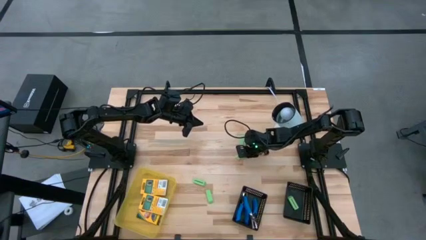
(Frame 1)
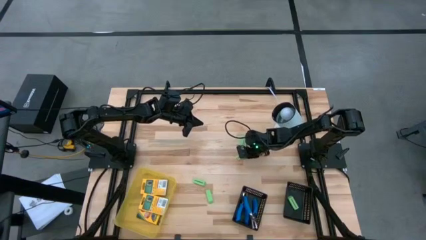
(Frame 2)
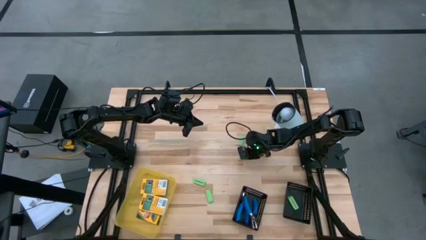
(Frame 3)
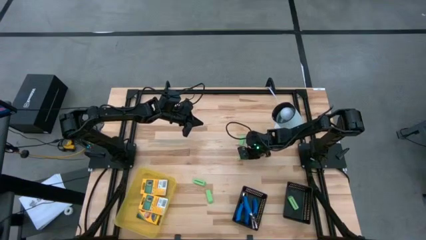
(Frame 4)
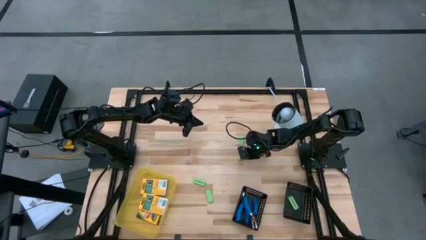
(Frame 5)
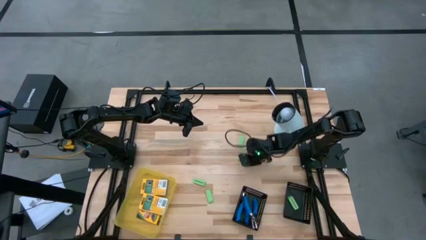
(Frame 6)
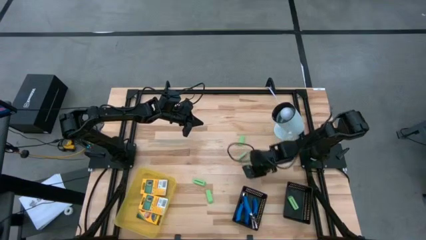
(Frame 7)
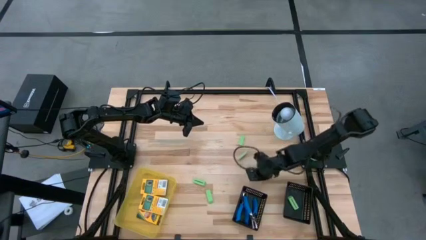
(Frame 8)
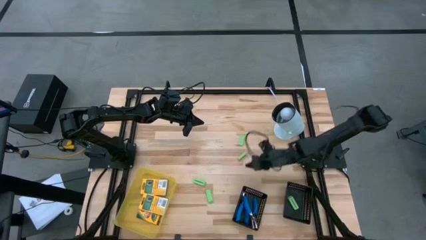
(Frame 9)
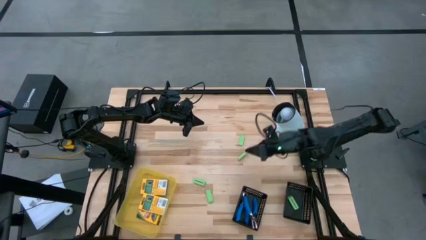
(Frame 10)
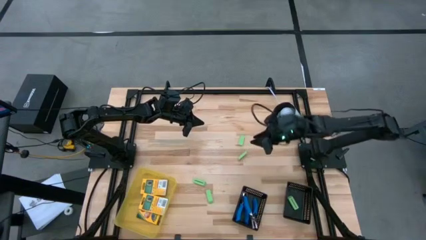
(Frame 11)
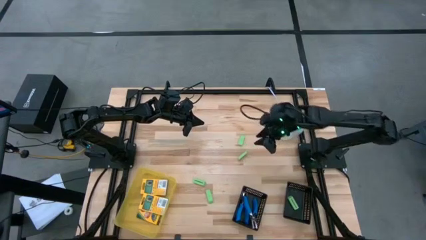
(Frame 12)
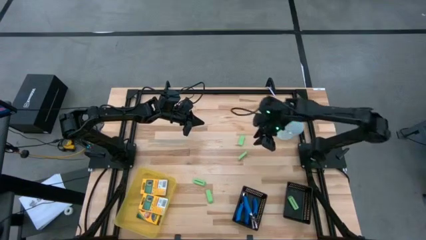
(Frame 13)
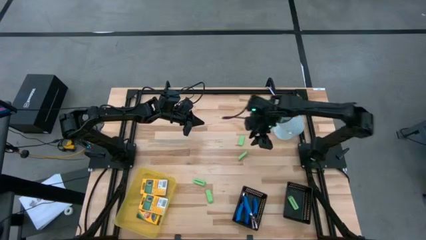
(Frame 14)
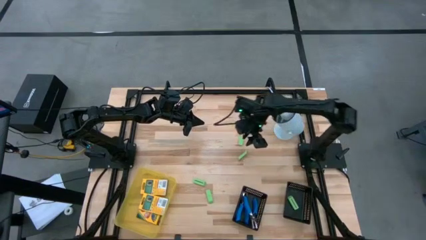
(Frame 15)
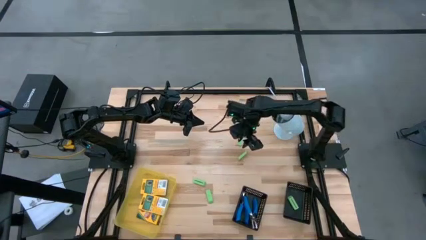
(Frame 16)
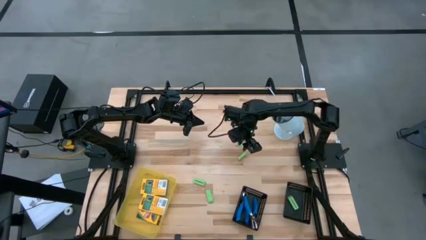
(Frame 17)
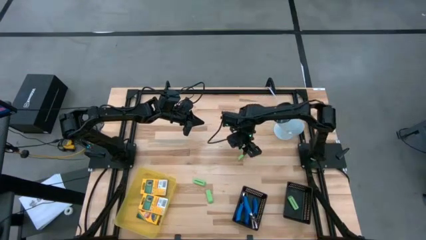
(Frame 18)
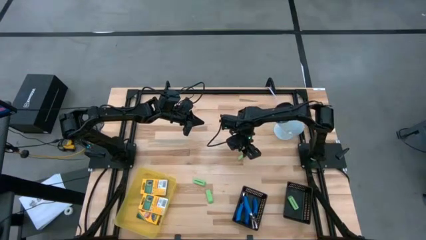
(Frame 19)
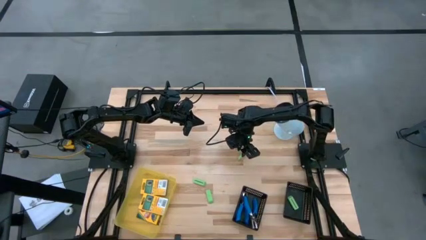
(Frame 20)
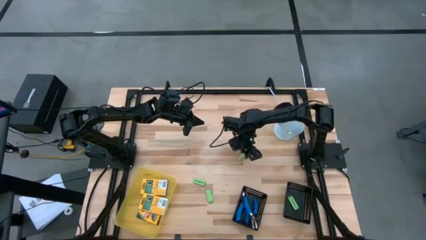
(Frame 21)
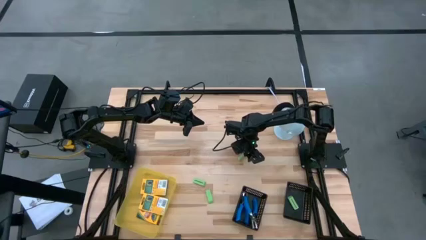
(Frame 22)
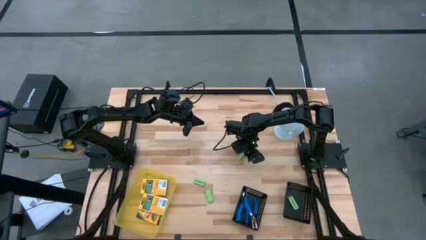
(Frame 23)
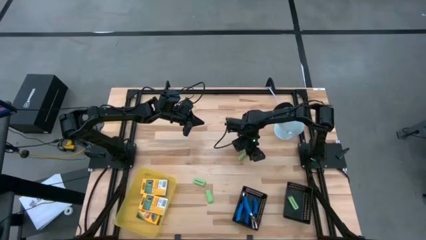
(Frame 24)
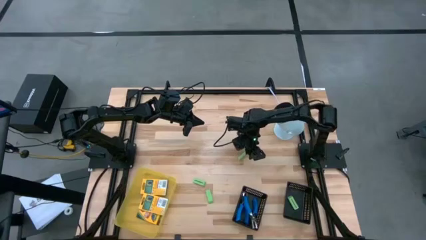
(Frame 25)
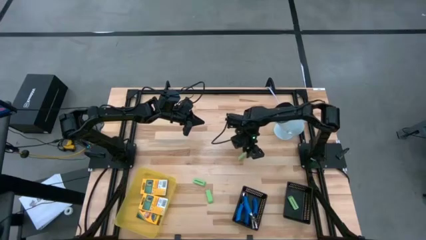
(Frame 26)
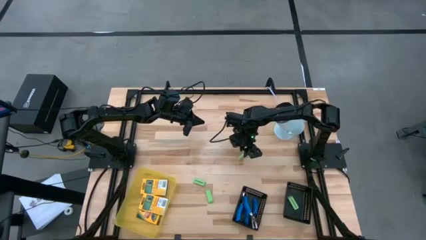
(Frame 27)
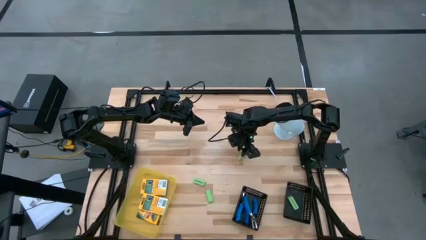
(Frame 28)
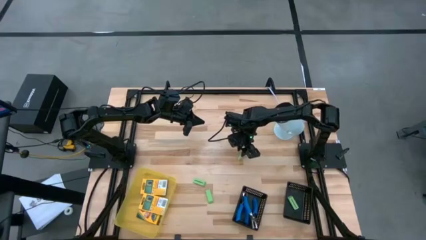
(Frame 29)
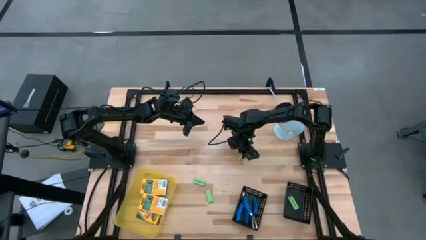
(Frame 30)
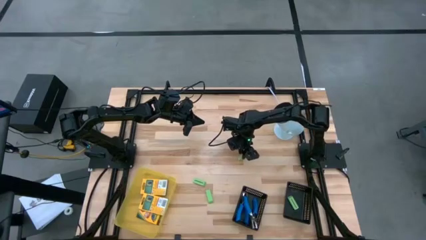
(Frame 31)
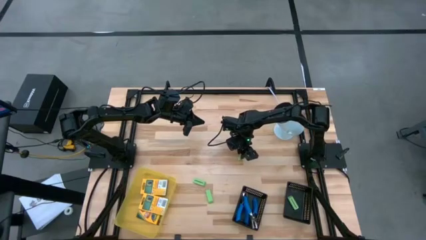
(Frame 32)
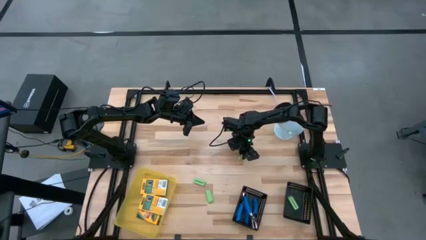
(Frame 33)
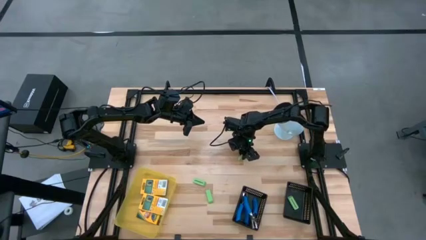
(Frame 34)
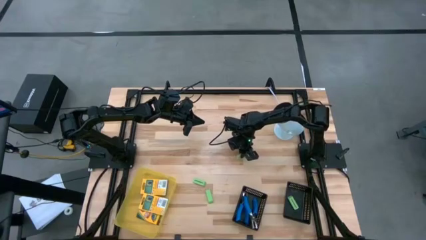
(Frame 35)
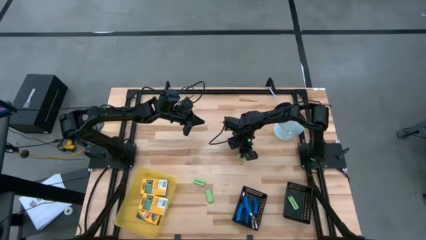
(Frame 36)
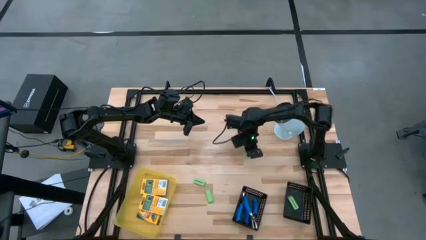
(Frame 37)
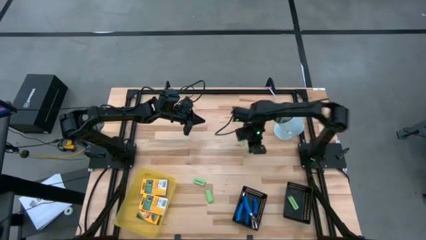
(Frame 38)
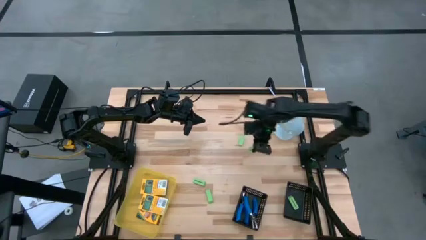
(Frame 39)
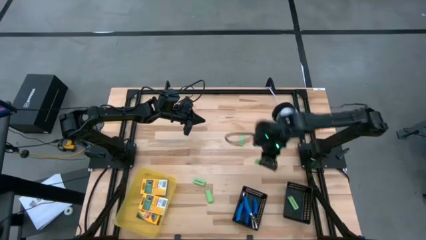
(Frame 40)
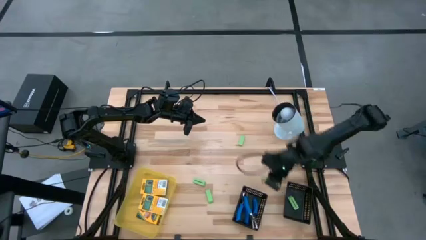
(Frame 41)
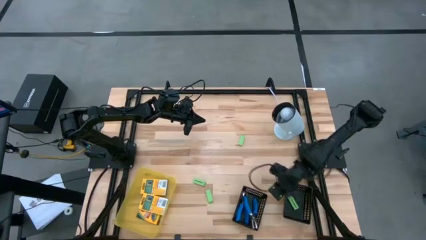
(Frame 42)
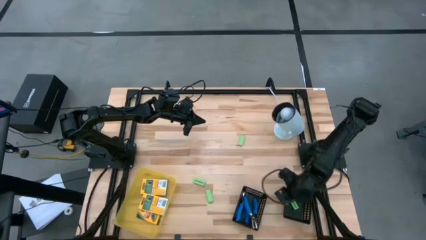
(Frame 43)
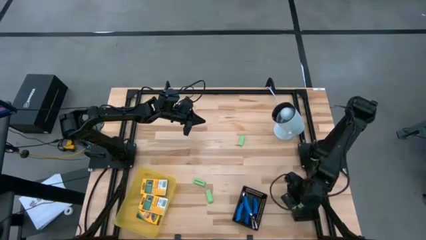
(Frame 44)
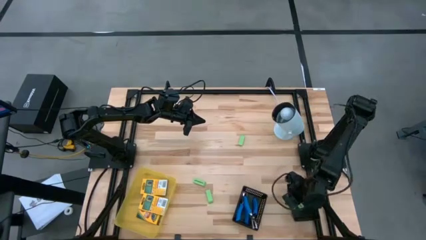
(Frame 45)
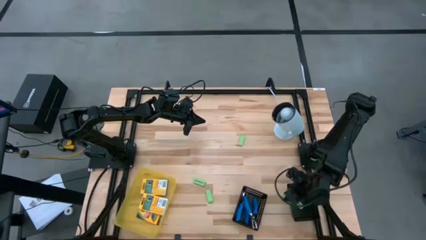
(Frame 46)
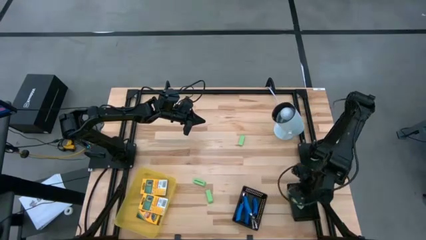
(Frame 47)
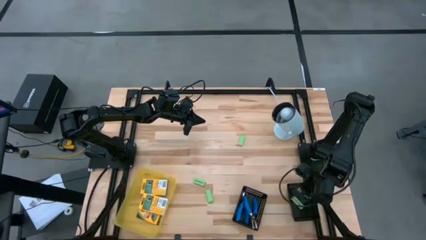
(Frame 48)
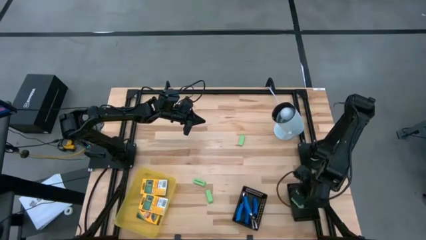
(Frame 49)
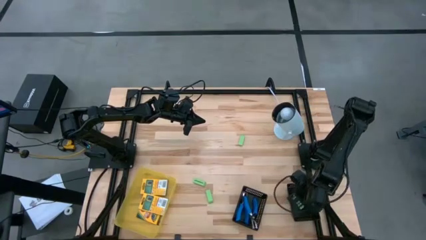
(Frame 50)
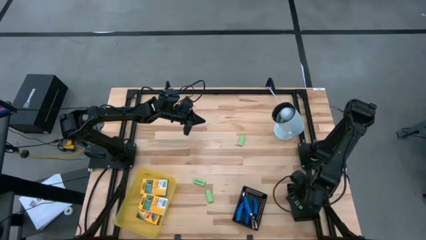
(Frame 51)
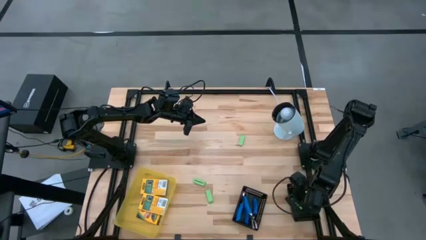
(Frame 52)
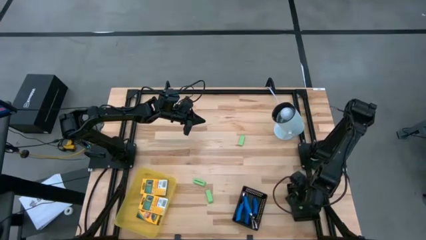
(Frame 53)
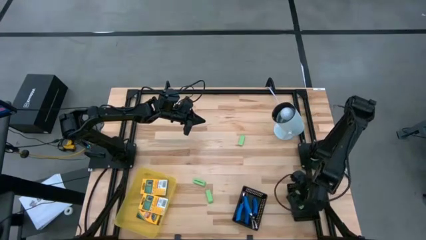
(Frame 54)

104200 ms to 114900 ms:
Task: Pick & Place School Supplies
Put the green eraser into the right black bin

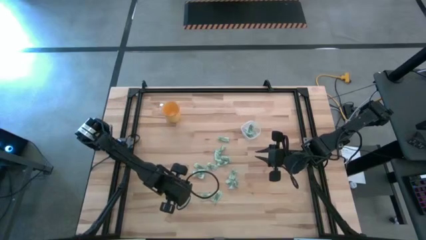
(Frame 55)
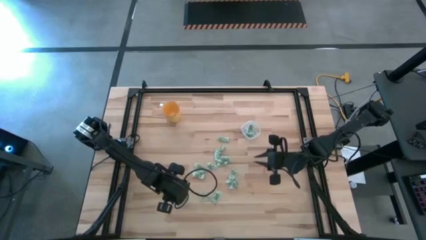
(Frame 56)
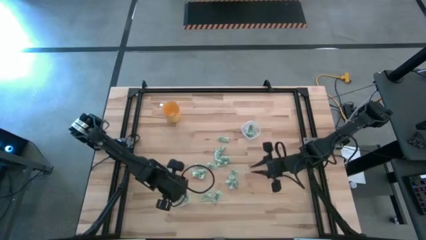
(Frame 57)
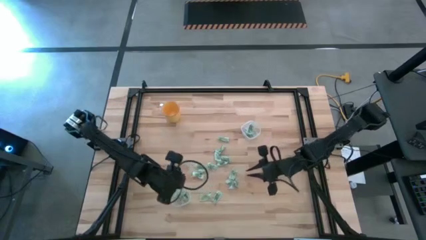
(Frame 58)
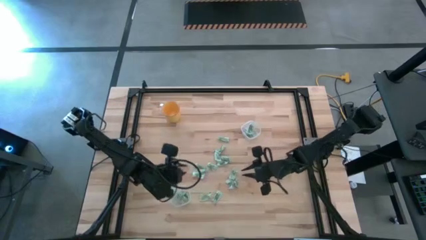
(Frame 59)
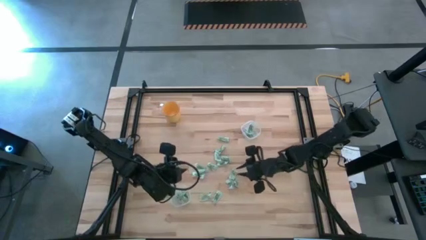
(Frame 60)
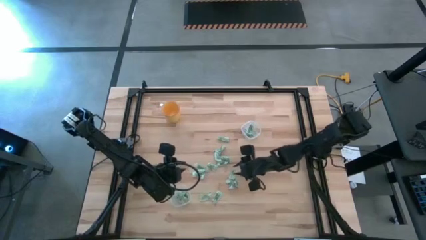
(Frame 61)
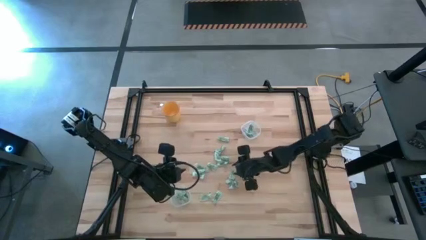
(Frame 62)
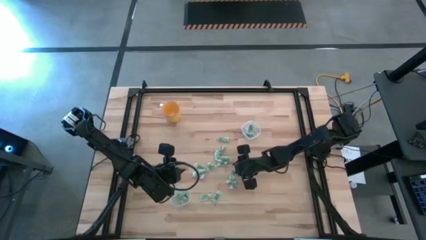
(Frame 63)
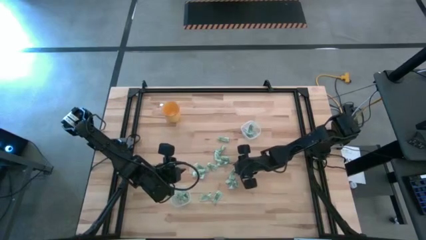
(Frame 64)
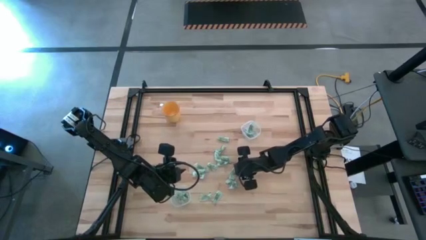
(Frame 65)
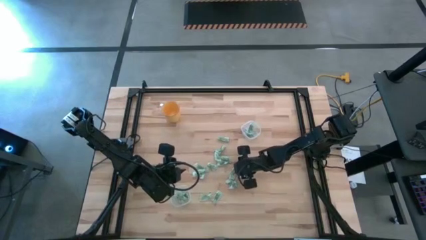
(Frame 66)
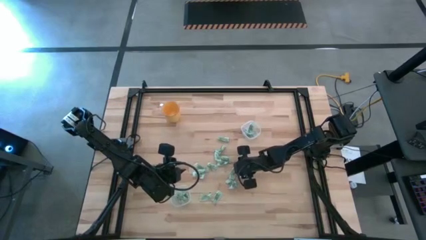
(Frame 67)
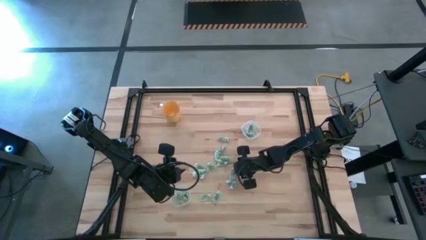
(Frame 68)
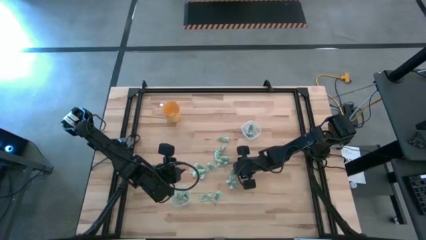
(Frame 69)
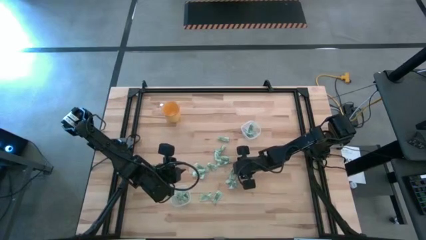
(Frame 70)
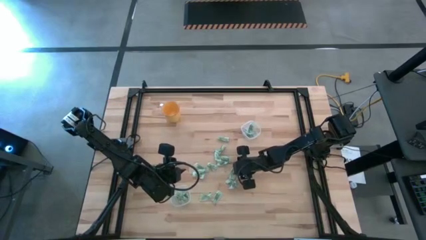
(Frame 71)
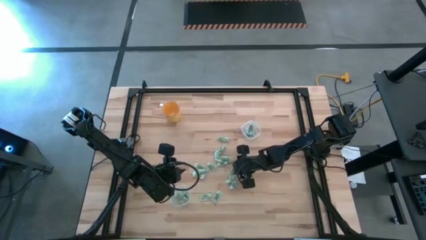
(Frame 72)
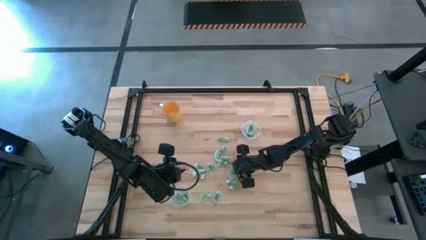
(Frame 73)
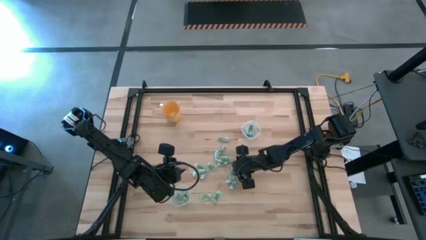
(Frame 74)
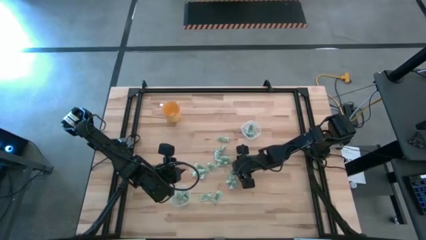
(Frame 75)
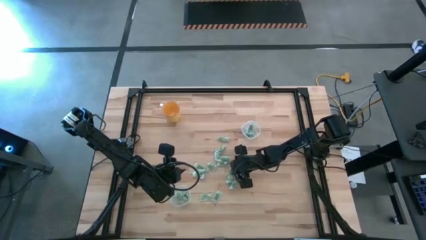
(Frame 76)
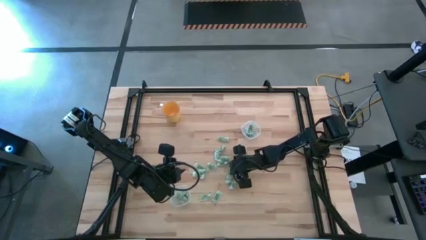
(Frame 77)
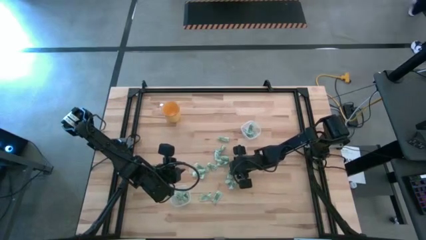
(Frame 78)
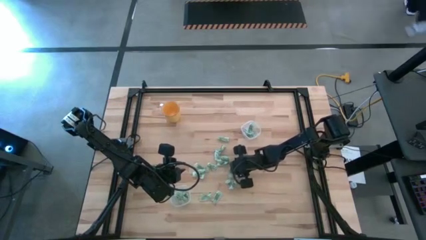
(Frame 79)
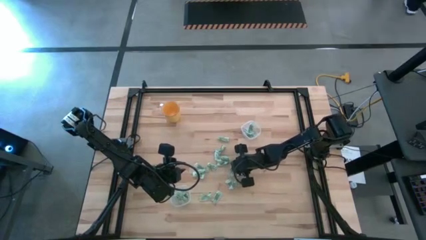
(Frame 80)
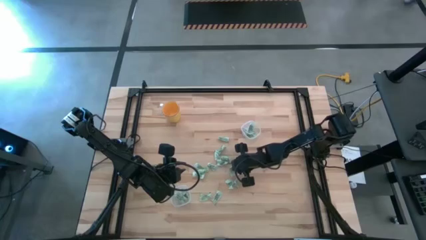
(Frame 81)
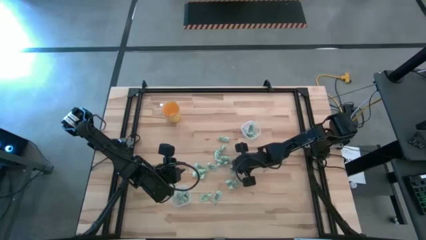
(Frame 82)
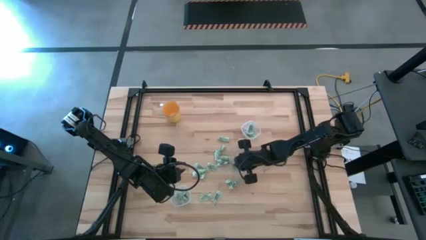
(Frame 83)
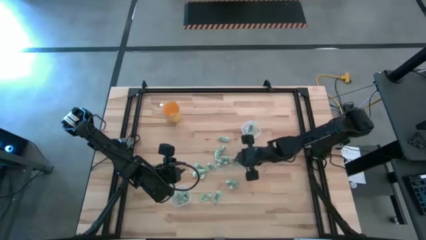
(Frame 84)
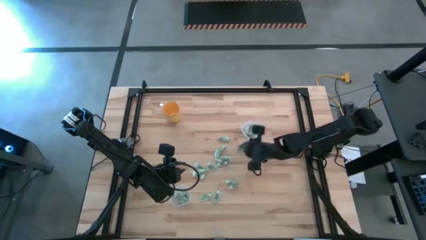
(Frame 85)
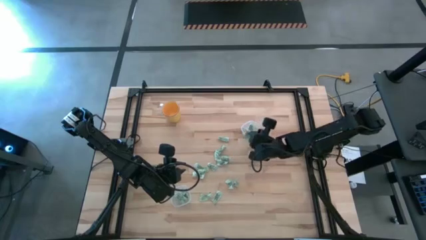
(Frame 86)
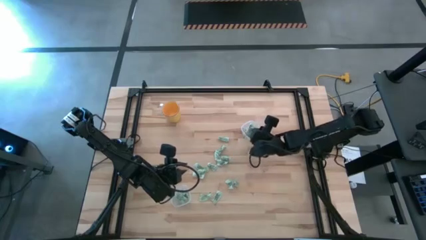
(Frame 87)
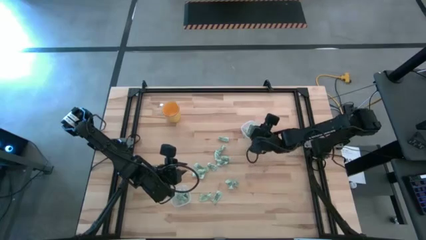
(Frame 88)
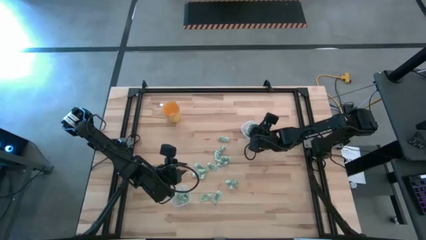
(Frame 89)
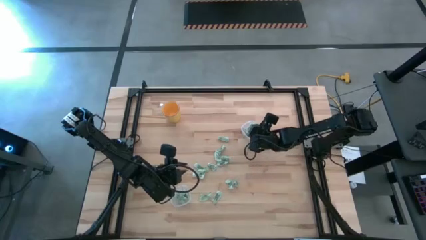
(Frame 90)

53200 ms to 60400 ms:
Task: Pick and place Stevia / Truvia into bins
Put the green stevia packet into the top transparent container
